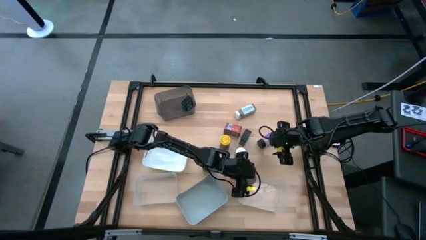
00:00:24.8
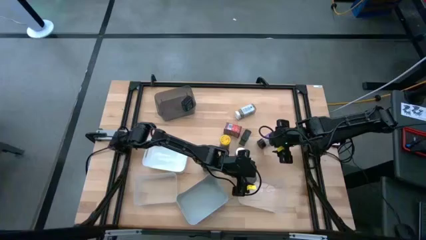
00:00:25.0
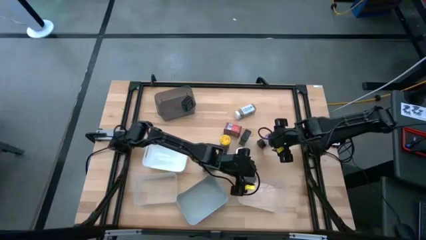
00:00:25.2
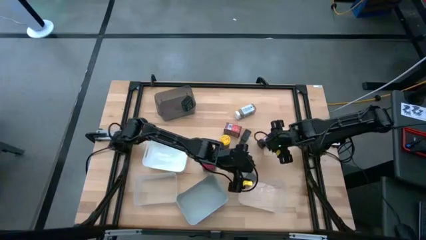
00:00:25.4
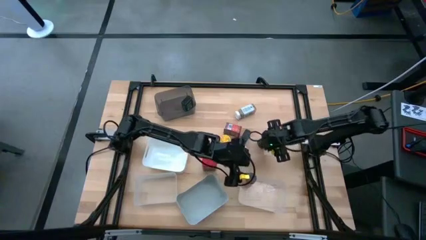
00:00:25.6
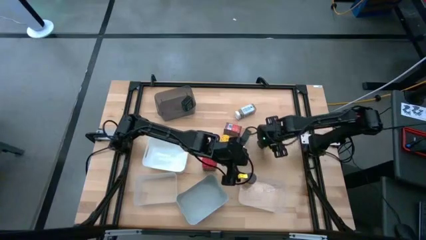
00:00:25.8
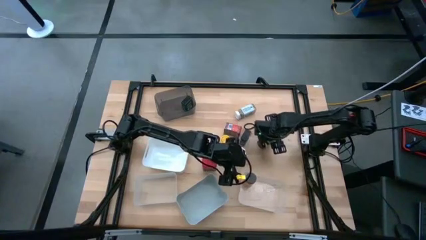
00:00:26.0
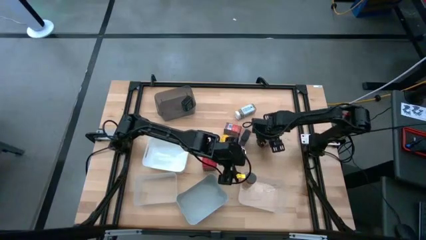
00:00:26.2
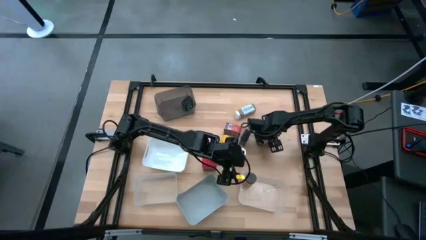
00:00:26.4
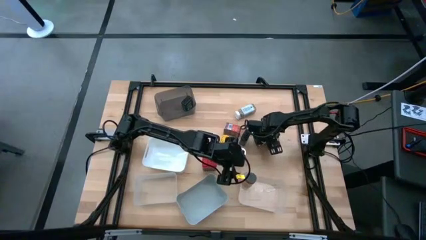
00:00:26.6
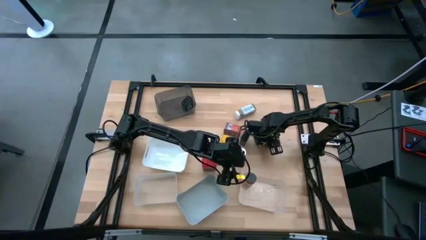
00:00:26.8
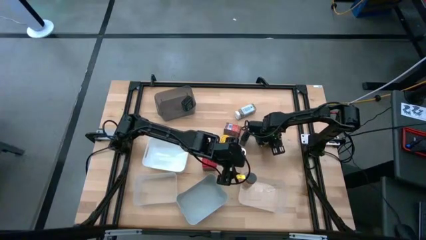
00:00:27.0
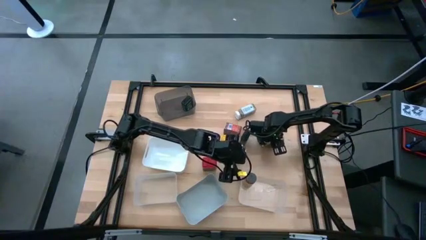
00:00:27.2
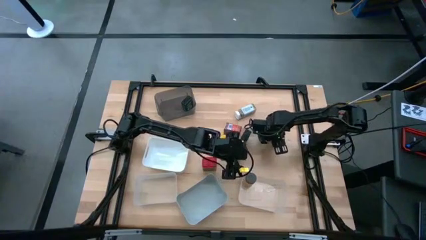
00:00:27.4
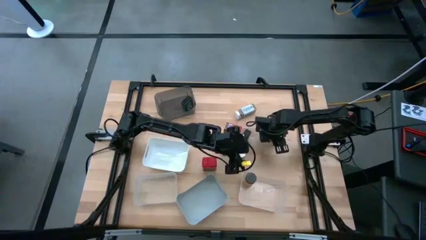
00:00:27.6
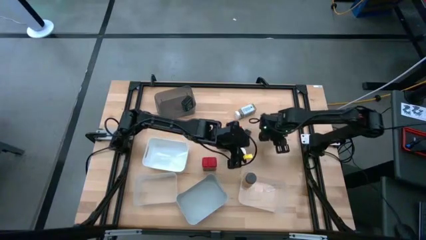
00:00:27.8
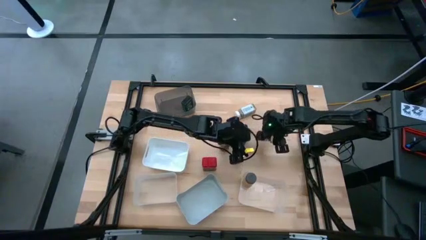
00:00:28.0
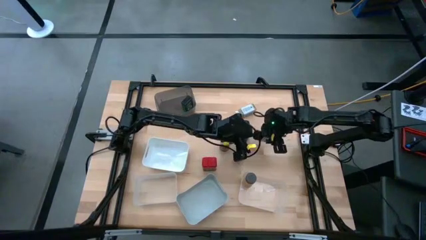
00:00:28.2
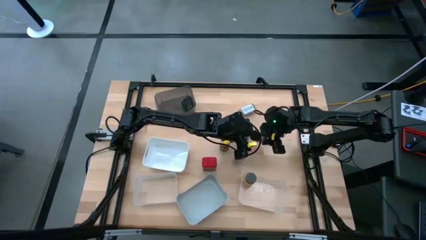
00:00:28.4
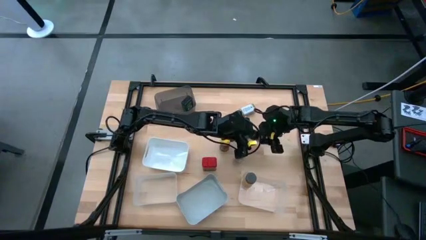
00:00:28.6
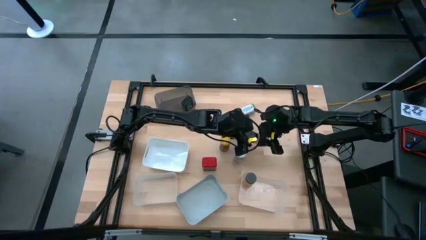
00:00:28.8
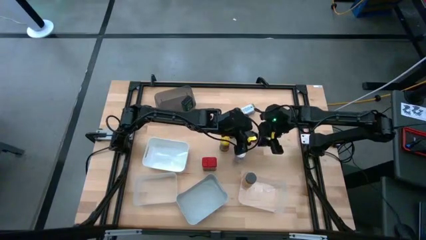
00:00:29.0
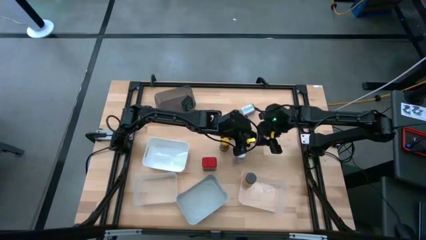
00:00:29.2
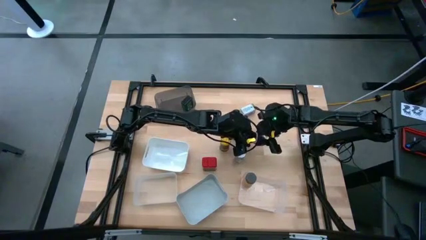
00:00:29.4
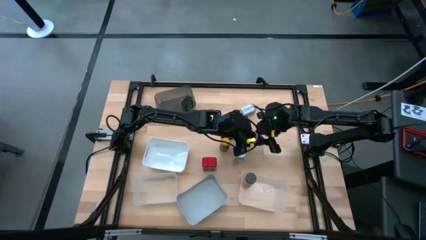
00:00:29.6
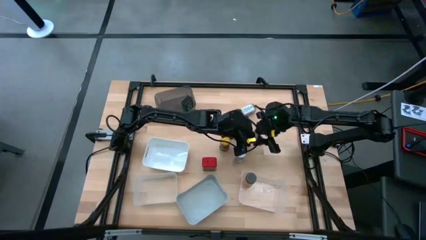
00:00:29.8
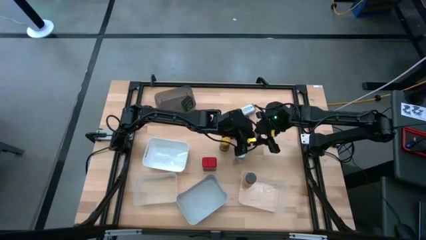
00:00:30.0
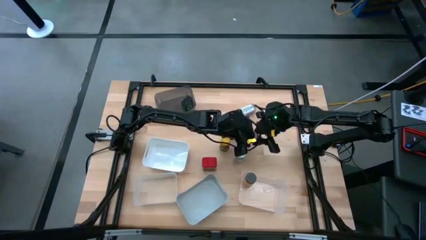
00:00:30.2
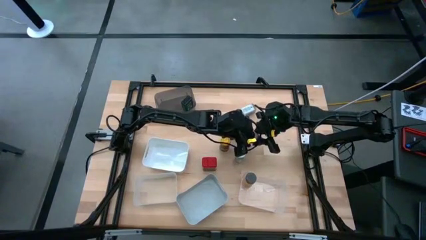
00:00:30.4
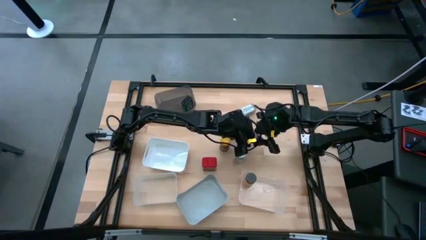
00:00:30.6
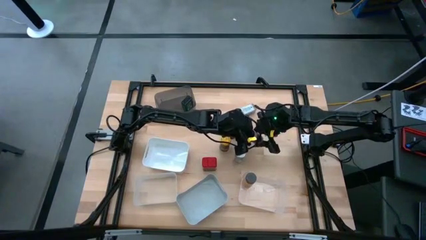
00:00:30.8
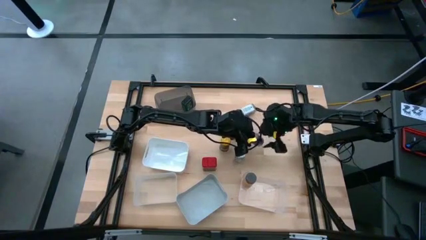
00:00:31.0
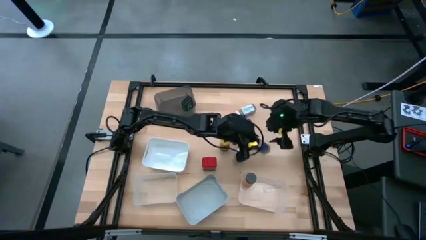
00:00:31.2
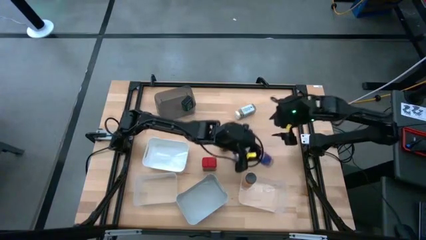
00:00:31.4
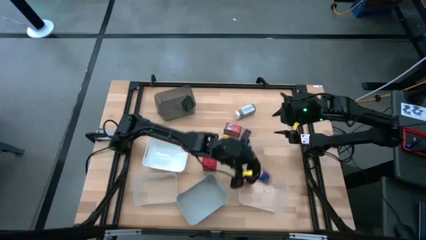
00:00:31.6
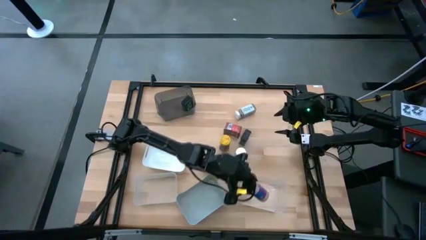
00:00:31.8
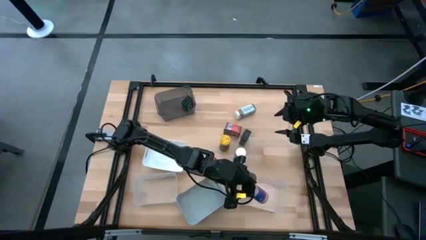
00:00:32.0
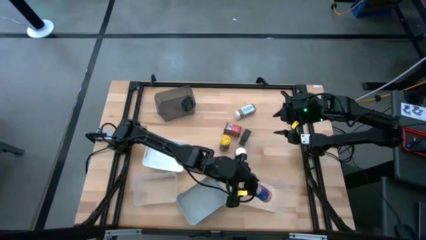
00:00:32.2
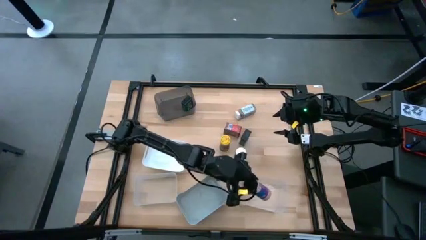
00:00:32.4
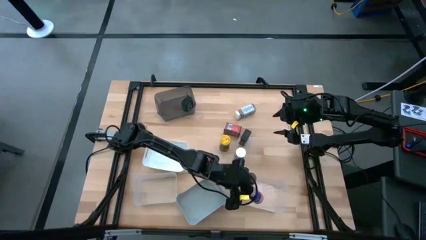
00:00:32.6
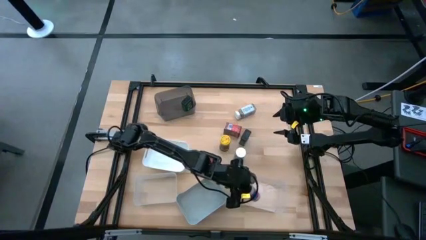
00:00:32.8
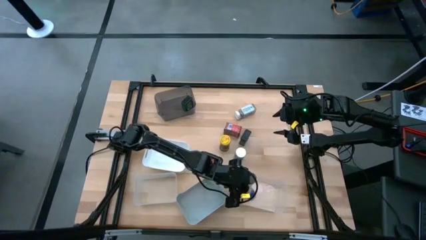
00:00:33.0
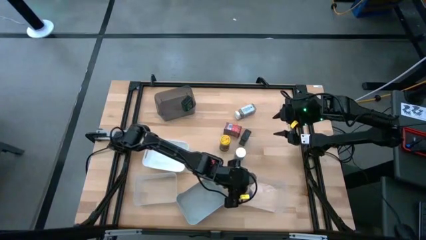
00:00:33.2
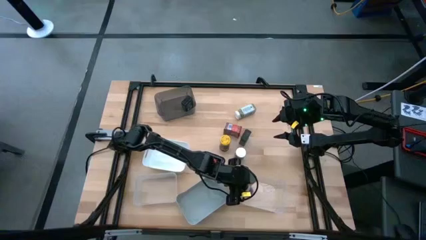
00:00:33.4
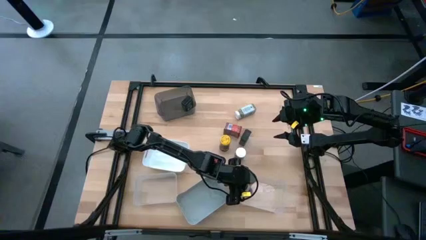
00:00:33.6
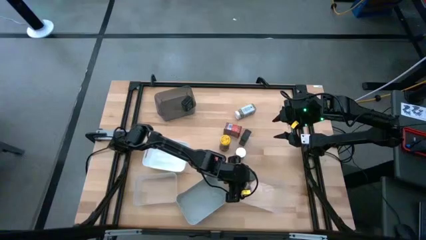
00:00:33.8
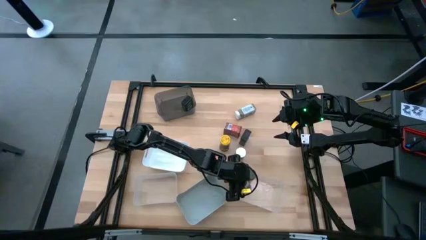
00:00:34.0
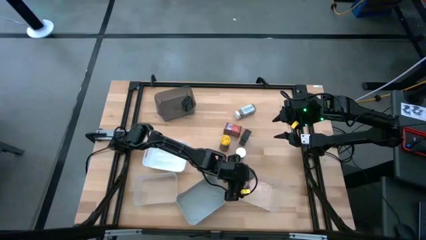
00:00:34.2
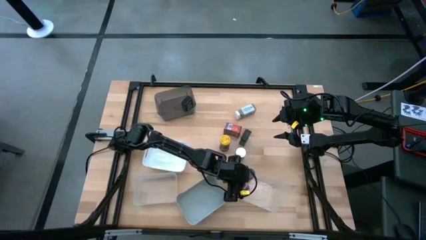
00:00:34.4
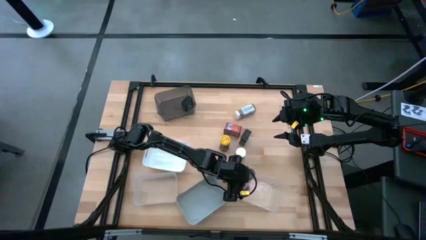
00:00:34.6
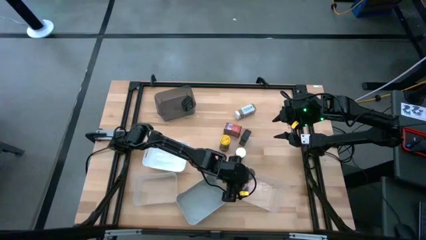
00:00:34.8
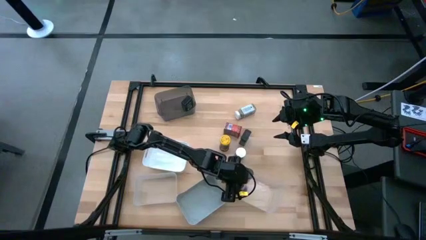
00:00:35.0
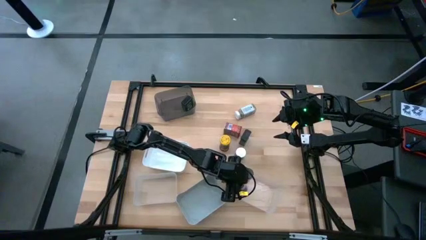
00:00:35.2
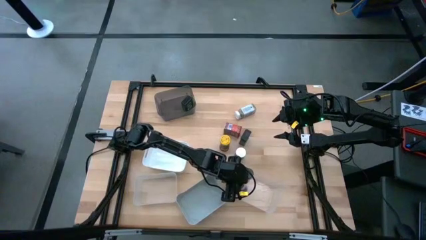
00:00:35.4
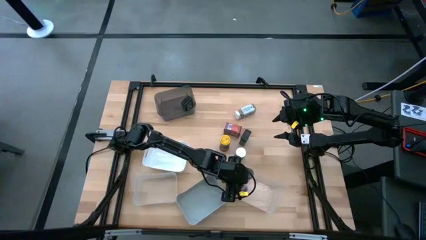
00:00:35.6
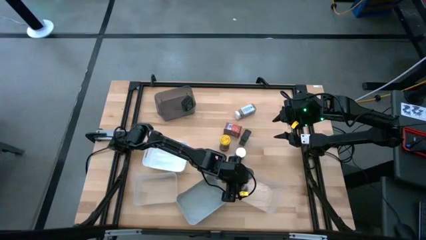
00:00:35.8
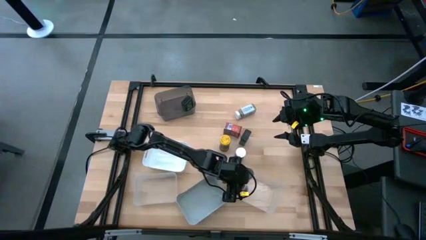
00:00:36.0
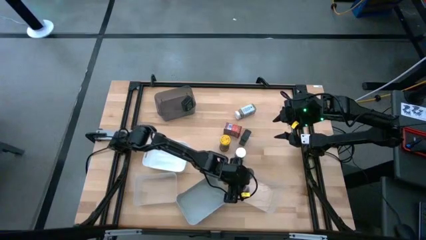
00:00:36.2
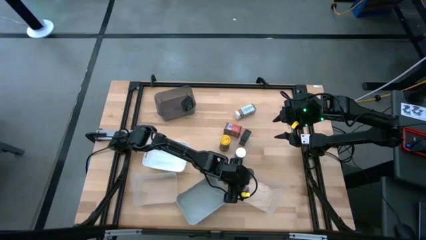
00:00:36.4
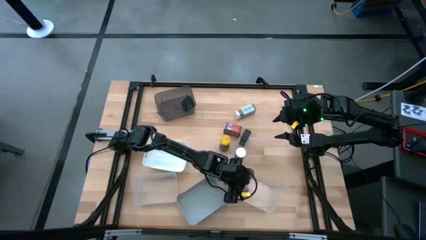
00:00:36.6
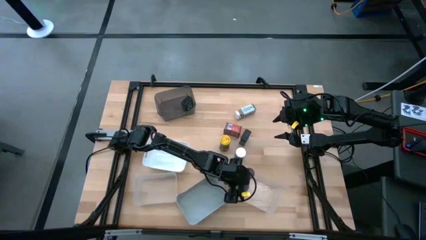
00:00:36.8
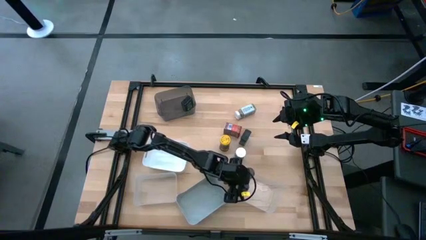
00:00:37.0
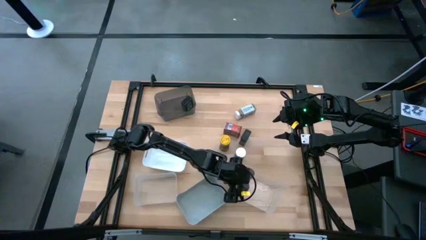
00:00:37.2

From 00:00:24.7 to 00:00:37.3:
Task: Sort spices by type
Put the black seasoning bottle into the right transparent bin

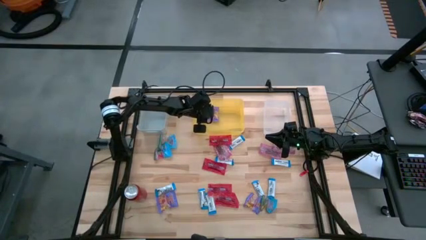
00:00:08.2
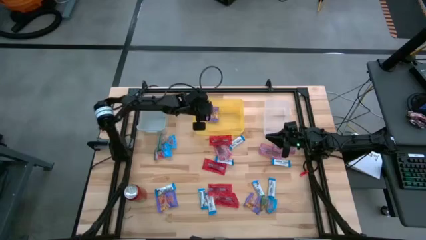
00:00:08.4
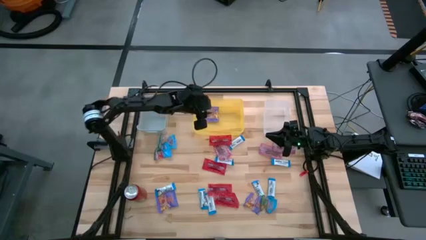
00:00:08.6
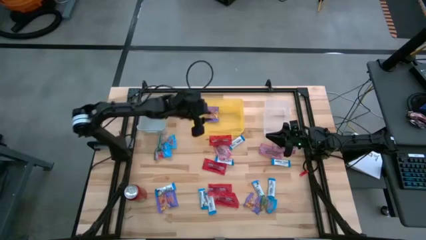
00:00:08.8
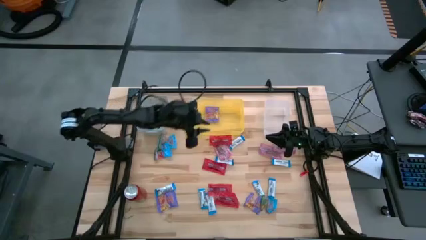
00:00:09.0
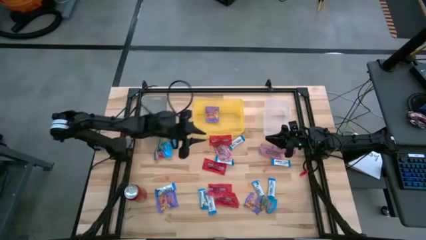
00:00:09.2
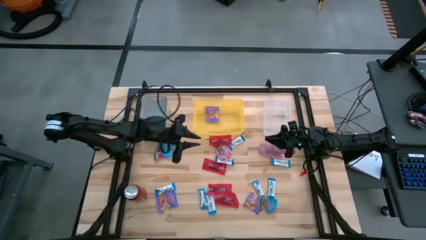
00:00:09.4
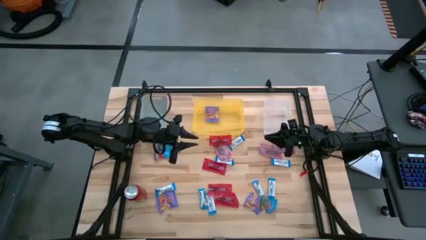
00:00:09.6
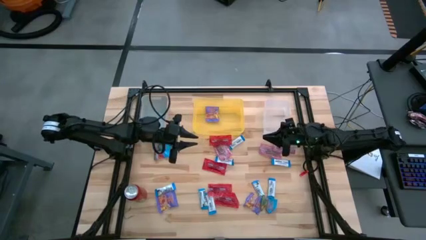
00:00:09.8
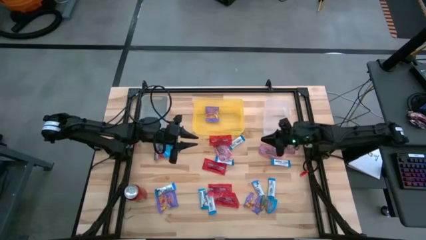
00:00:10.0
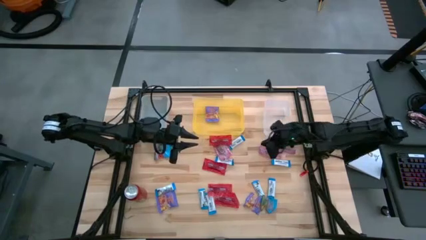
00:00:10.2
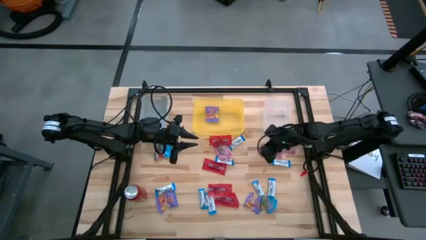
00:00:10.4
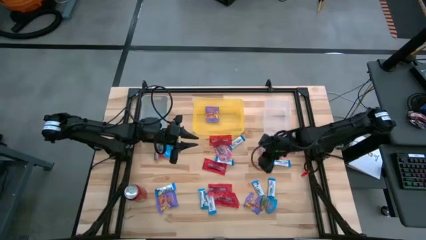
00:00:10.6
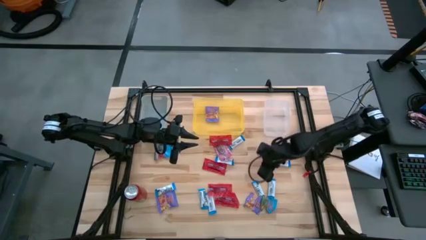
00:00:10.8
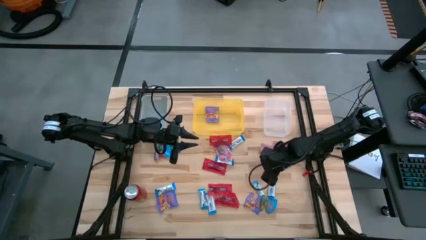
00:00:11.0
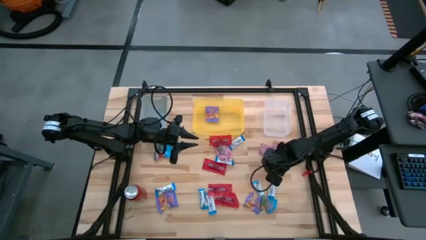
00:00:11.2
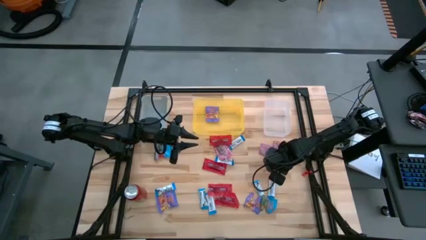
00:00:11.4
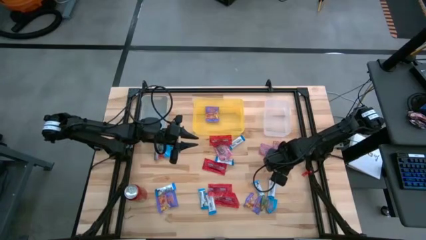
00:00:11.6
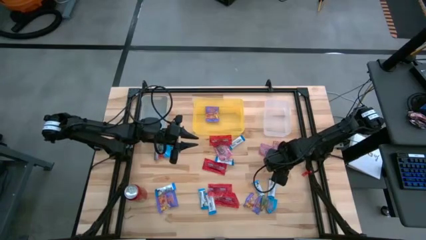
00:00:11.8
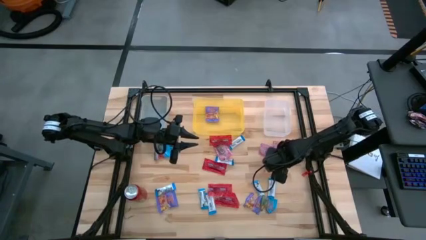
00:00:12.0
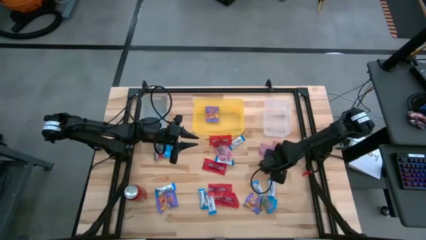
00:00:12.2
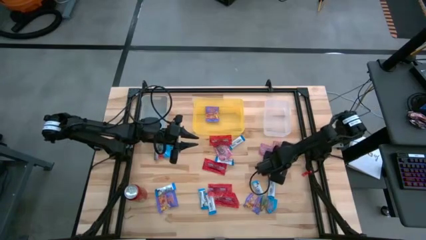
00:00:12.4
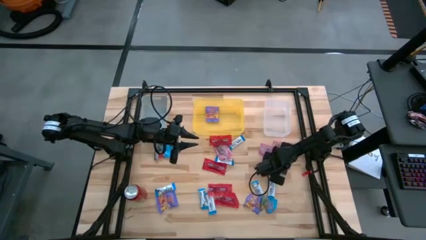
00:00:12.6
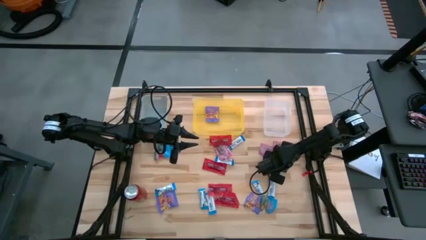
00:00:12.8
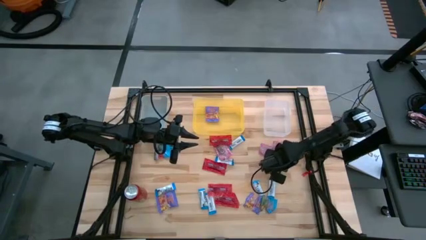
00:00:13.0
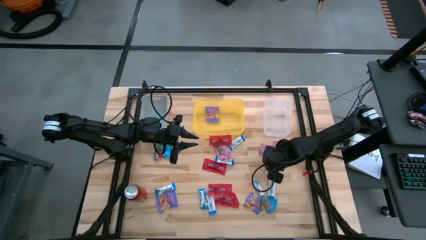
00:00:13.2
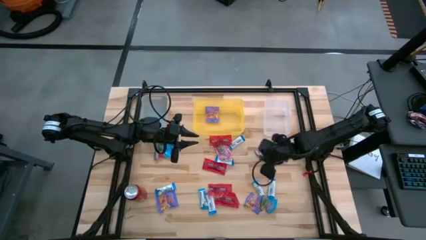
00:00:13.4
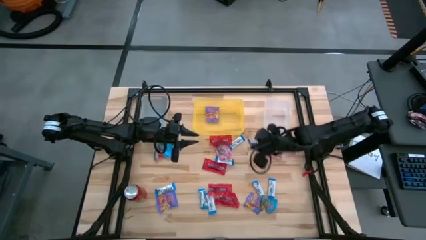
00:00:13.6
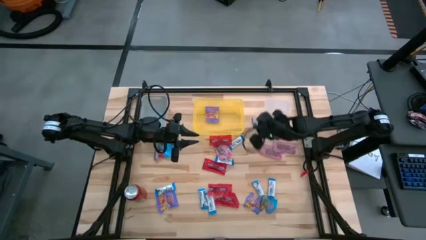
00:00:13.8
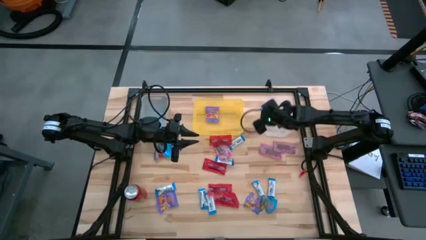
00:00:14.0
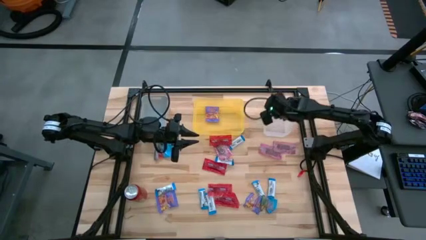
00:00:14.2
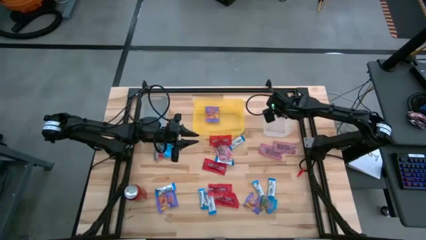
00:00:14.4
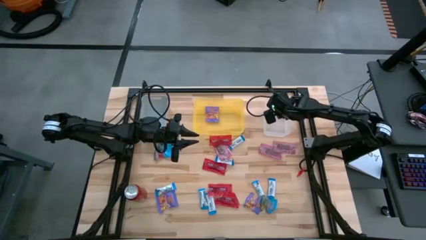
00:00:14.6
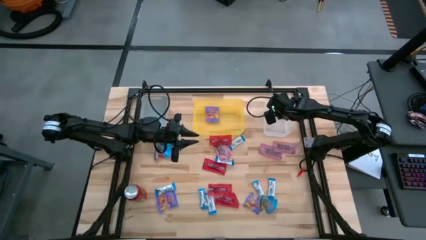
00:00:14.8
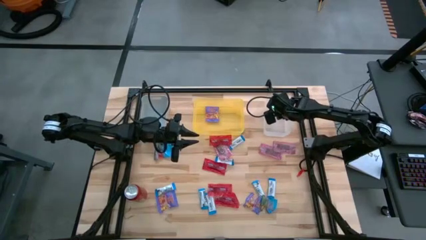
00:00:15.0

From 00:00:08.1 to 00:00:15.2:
Task: Sort candy
Put the white chocolate into the transparent bin
